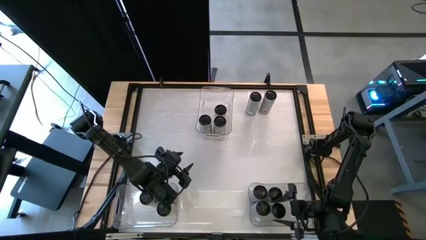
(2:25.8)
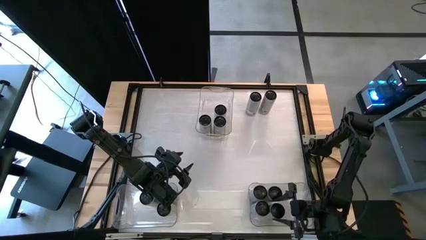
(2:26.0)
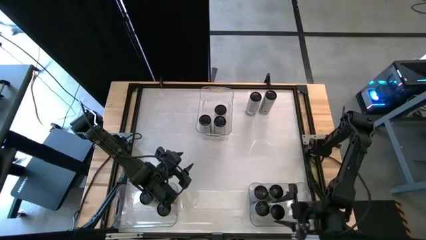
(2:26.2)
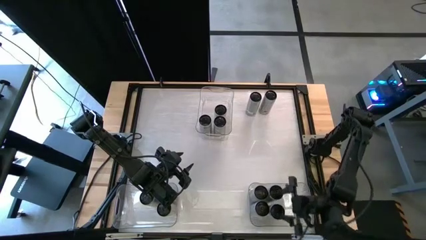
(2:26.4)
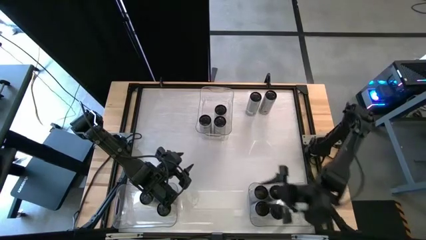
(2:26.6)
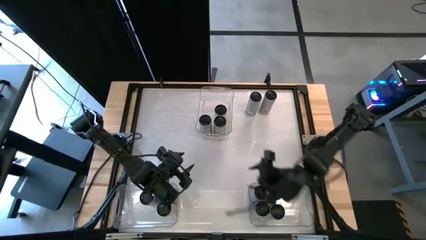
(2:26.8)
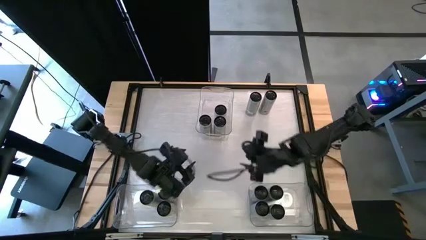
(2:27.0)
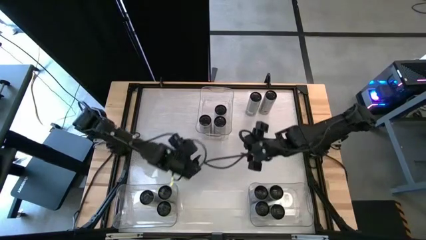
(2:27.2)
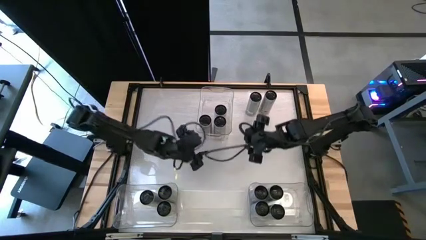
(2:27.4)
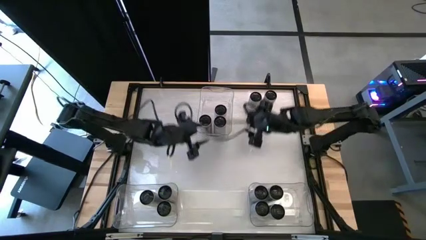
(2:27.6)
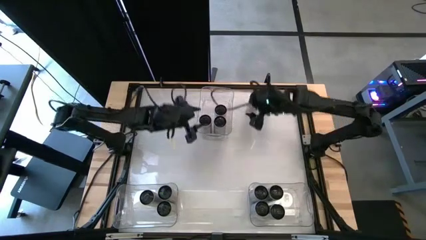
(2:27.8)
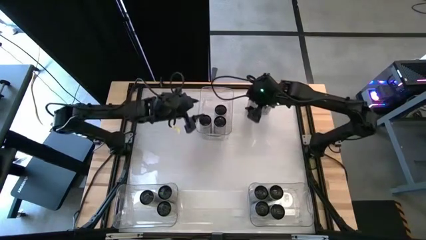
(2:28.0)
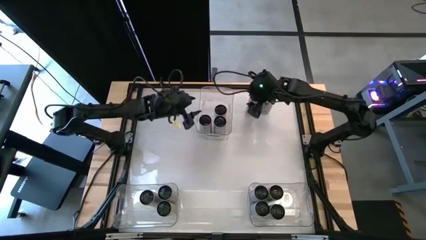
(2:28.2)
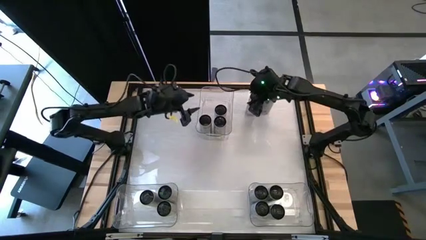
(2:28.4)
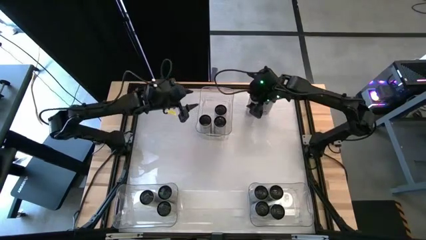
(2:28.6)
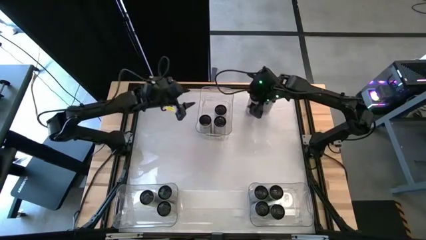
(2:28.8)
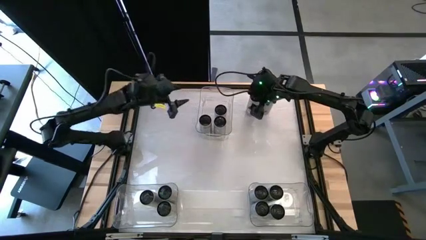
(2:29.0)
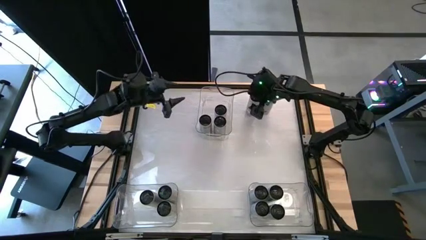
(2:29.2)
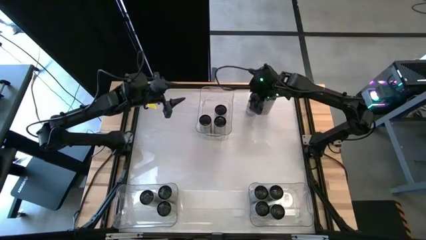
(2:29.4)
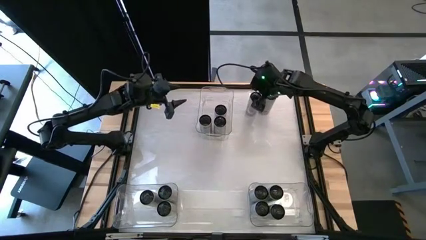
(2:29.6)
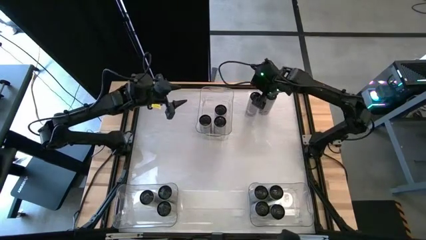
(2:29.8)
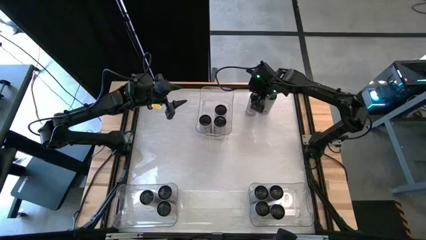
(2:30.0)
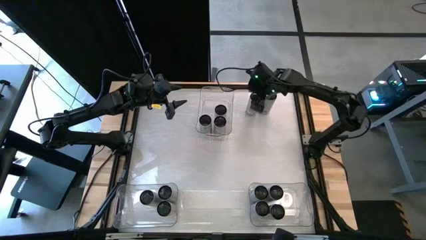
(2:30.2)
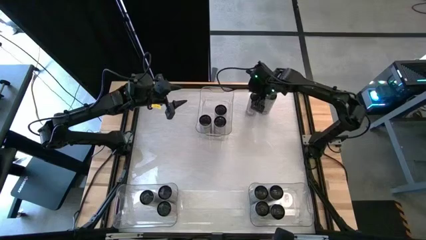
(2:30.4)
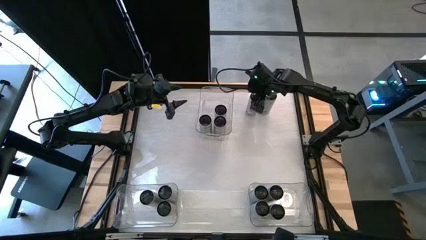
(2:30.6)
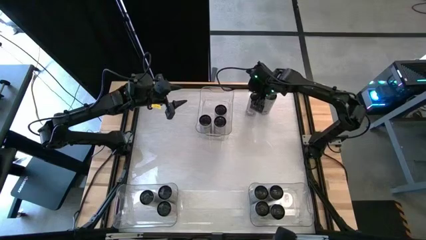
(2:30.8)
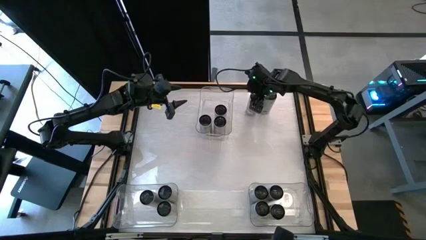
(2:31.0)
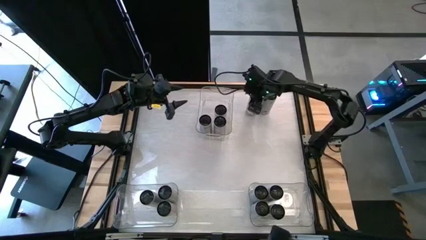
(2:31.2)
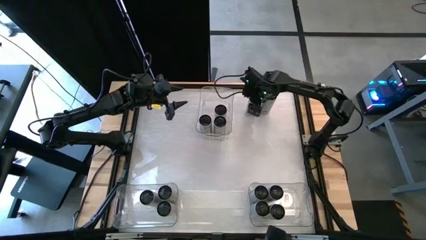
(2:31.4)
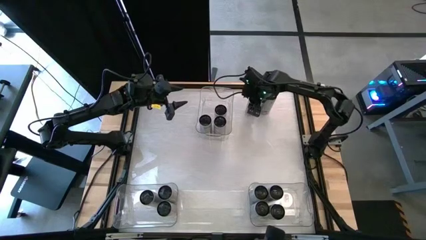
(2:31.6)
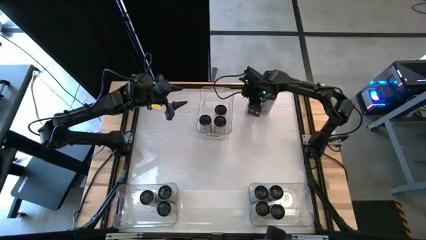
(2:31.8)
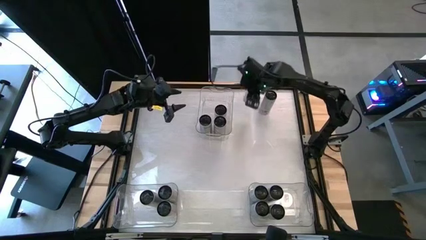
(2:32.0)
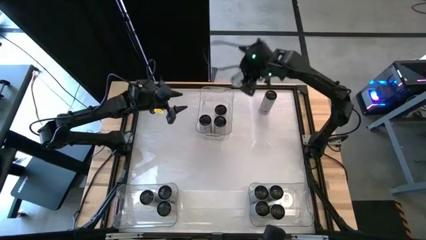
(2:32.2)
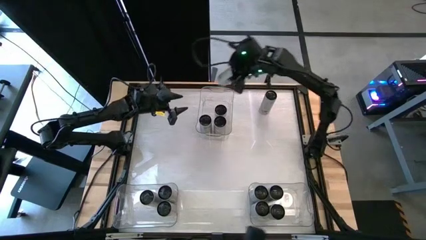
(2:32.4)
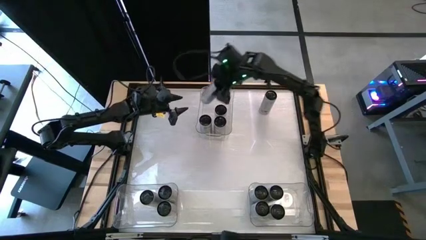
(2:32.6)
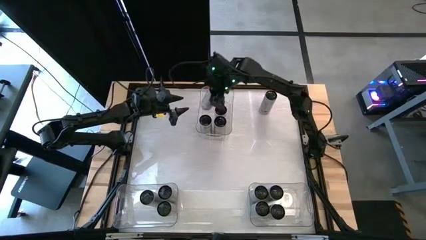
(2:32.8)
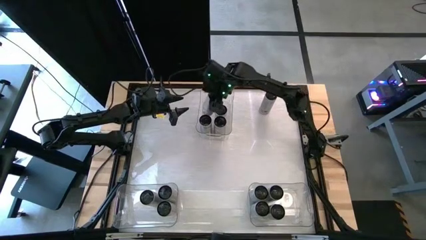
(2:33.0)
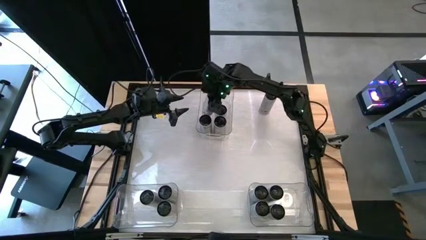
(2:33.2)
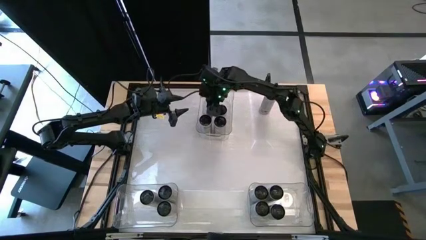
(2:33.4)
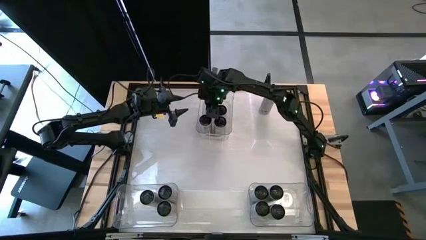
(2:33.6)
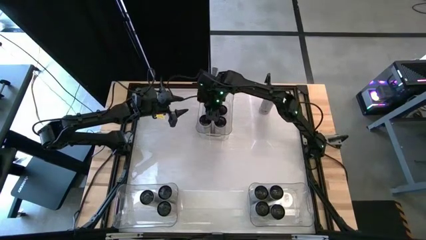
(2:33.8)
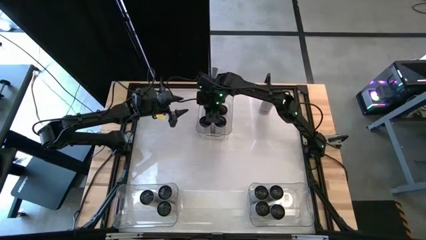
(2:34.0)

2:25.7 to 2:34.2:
Task: Sort soda cans
Put the white yellow soda can into the top middle transparent bin

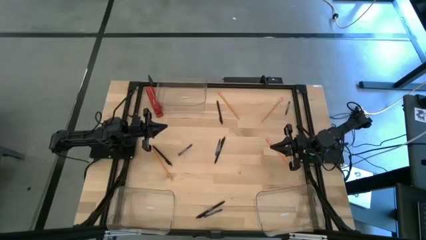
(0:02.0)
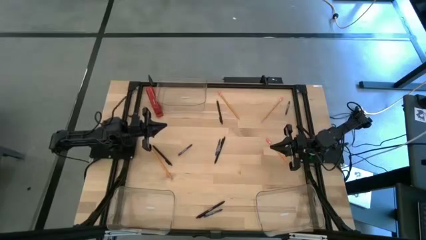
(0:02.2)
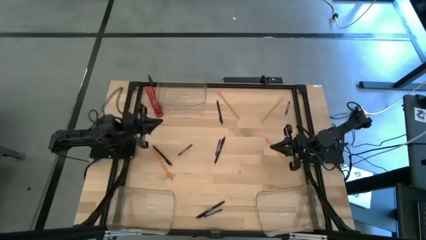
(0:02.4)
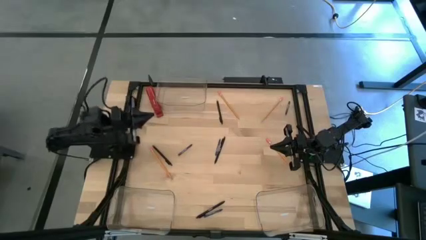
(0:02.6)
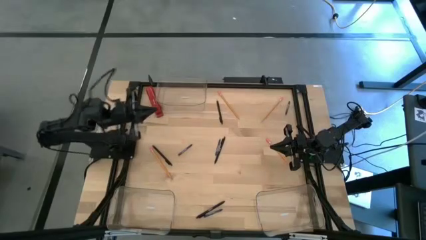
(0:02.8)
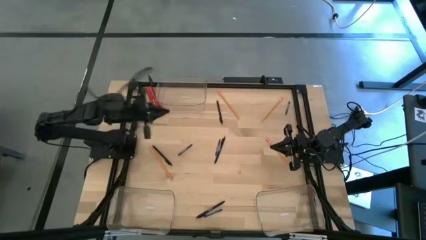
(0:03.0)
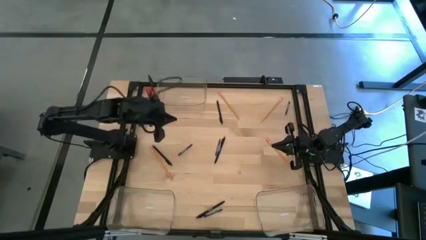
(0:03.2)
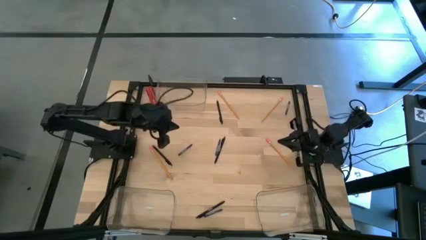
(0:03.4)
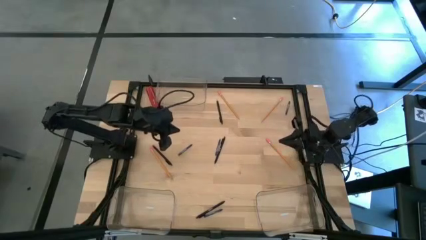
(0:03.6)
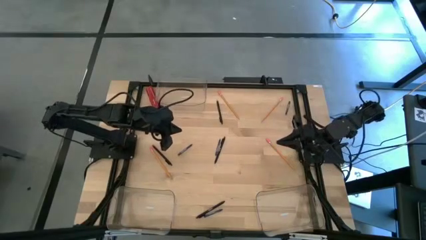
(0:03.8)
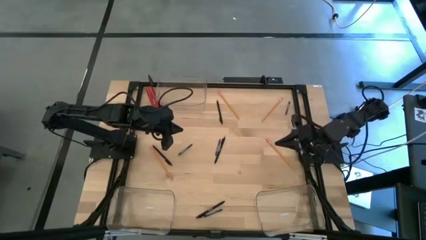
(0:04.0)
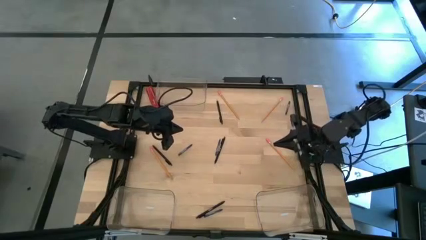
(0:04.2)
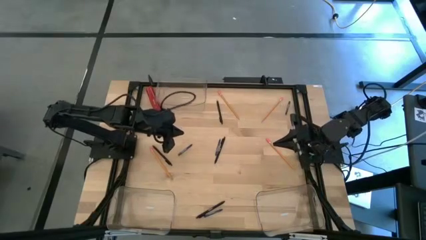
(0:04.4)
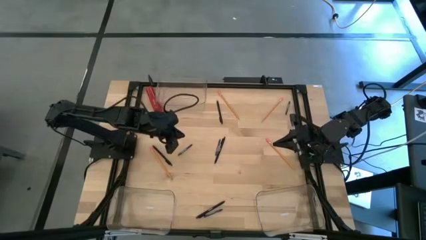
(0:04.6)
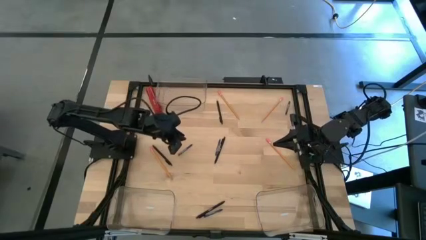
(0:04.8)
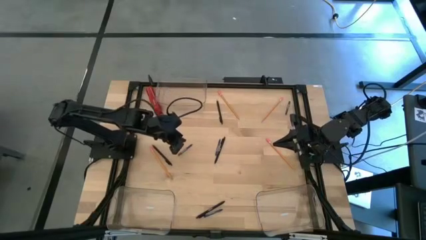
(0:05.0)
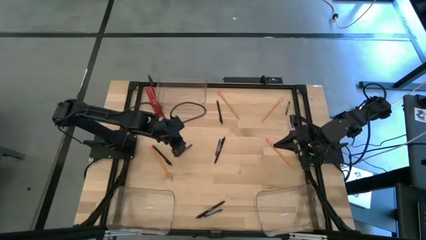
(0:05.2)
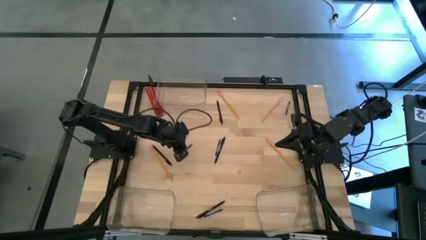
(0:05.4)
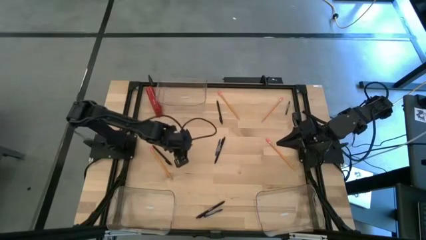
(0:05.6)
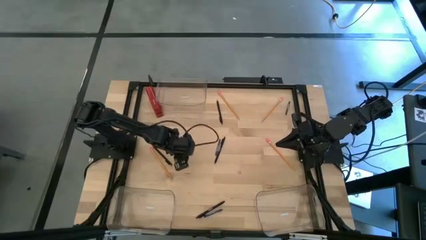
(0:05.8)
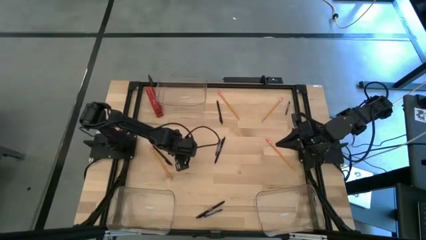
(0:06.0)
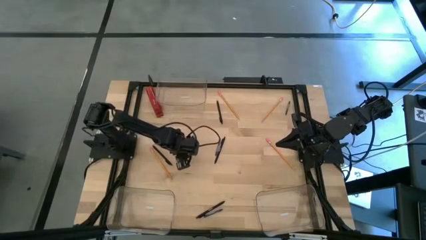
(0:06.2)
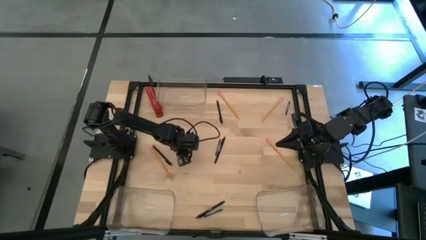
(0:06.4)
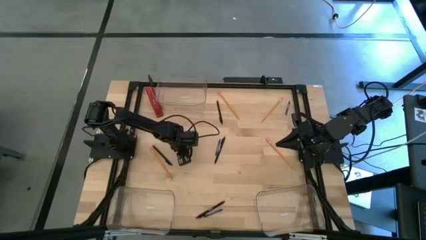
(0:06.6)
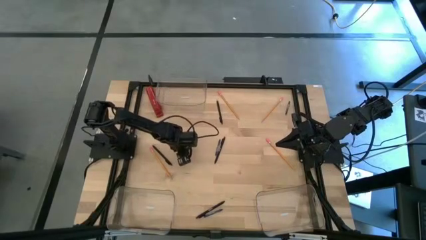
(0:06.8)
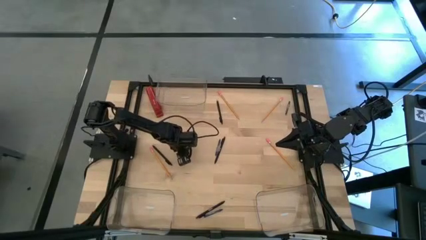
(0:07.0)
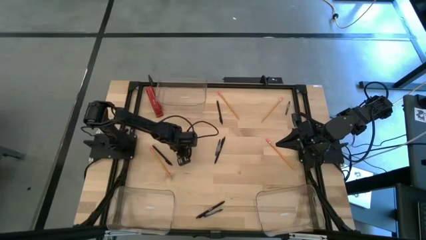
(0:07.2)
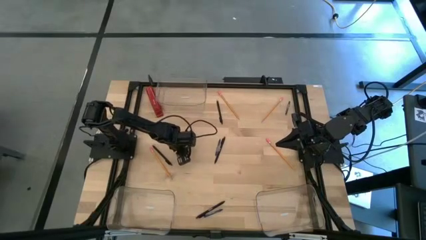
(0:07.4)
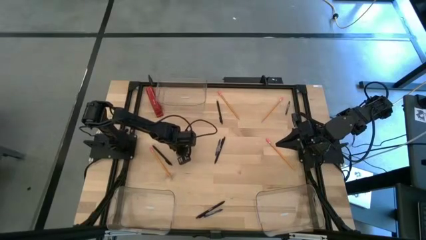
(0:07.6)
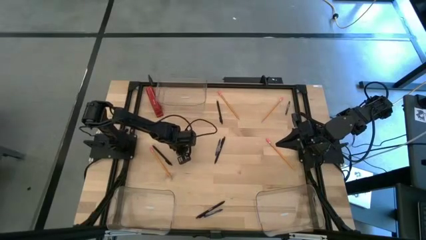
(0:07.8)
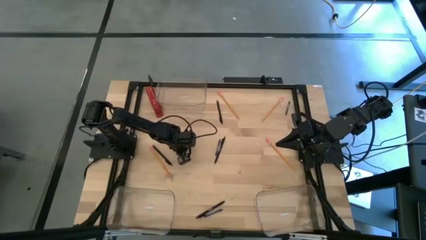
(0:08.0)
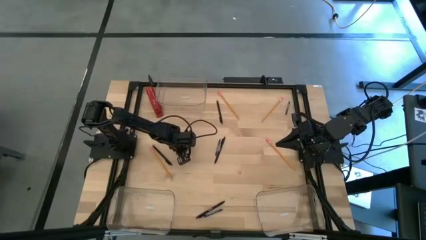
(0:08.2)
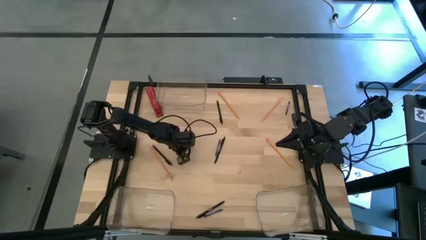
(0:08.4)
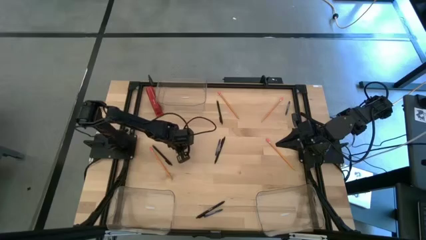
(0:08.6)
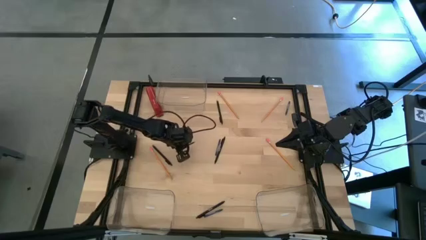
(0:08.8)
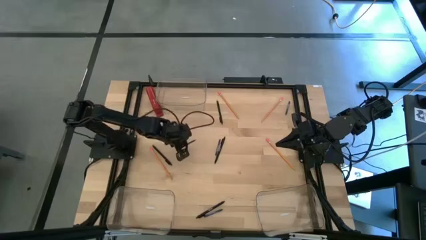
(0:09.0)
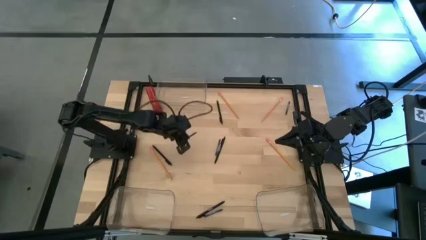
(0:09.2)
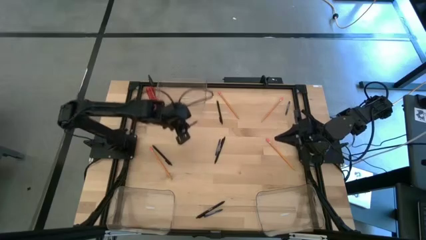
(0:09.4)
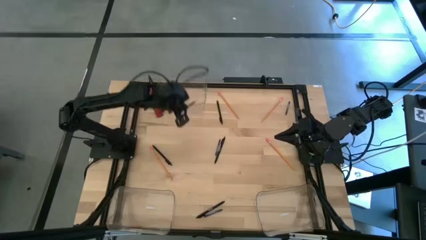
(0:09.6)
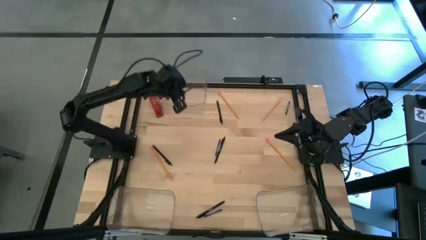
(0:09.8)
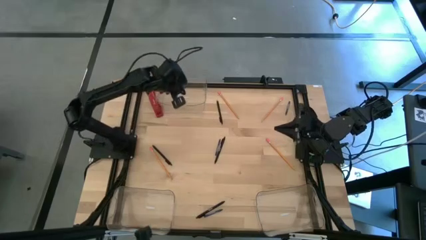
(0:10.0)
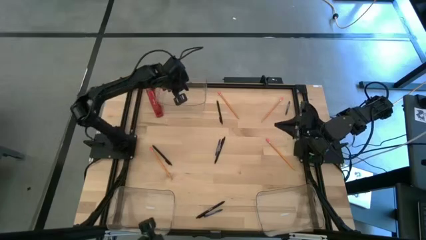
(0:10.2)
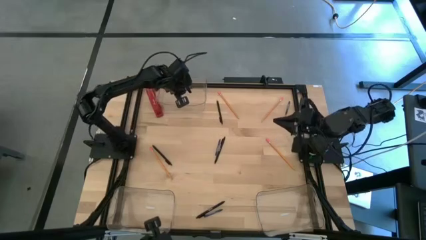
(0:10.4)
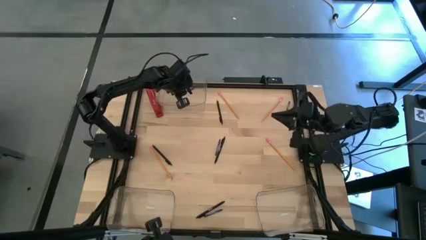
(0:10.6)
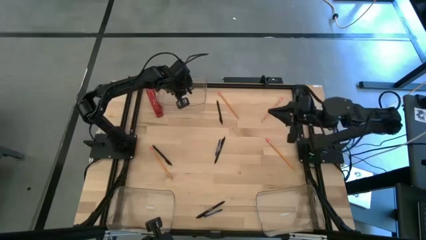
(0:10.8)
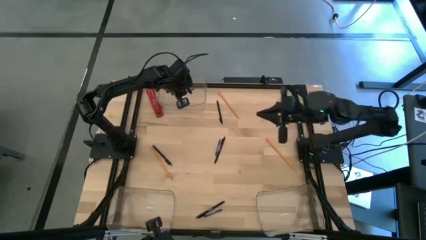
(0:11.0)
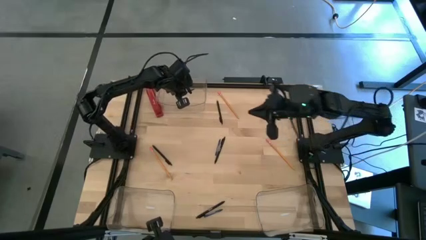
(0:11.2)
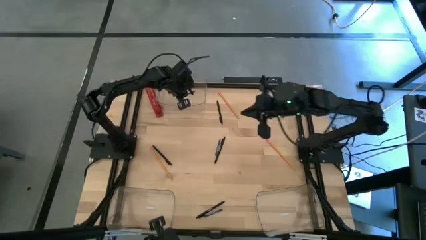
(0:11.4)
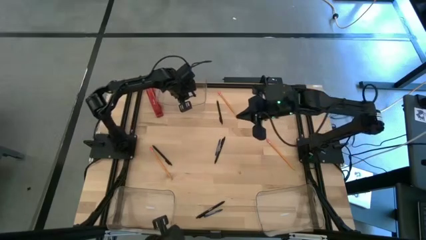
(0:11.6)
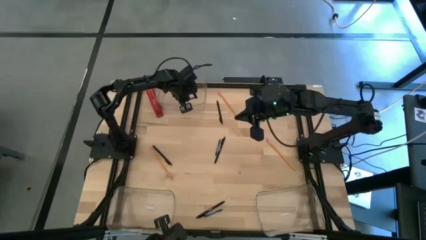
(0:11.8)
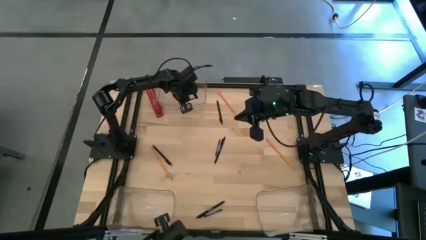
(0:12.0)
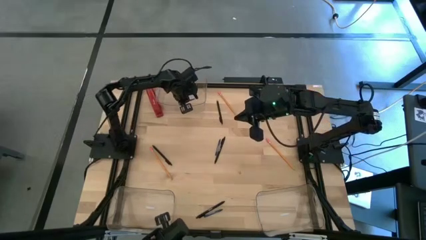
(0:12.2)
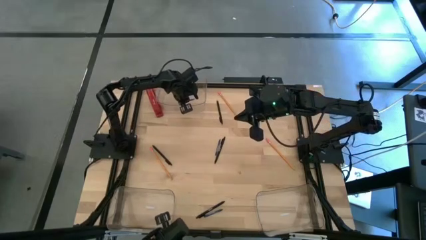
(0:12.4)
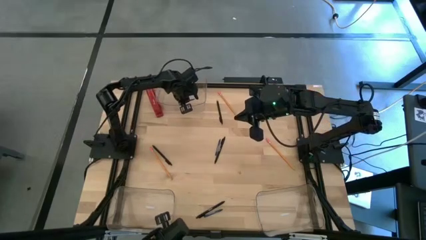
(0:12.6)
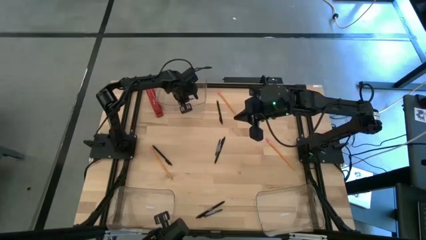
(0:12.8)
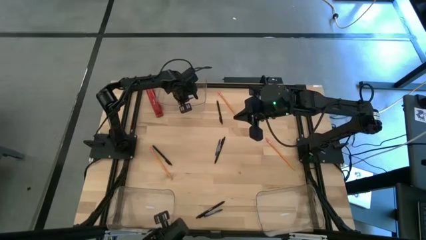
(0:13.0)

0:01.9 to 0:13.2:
Task: Sort crayons/erasers/pens/pencils in bins
Put the blue crayon into the top transparent bin
